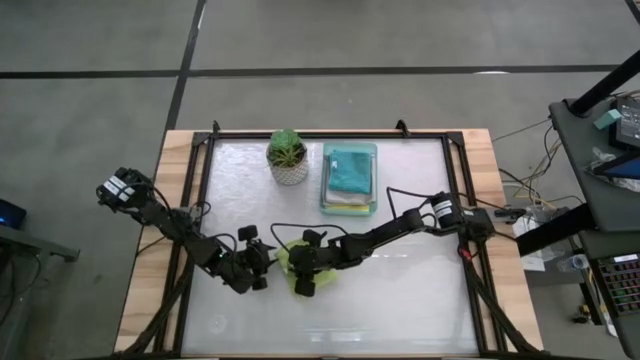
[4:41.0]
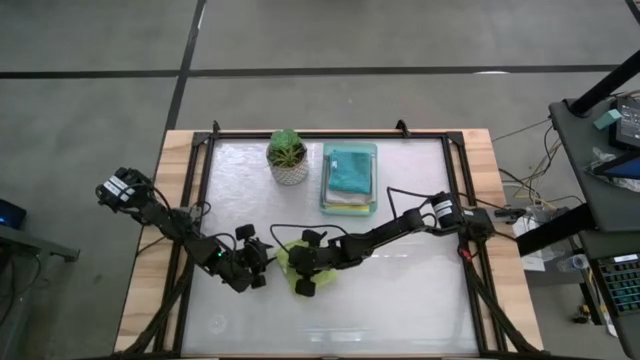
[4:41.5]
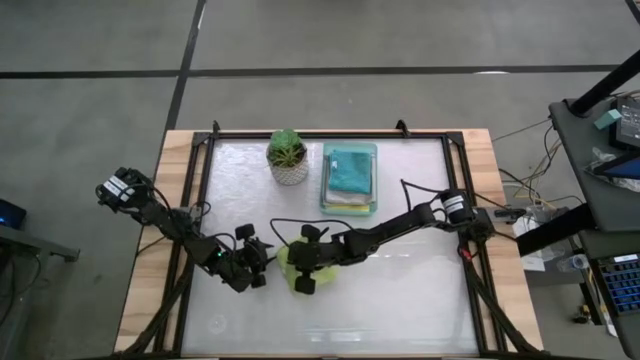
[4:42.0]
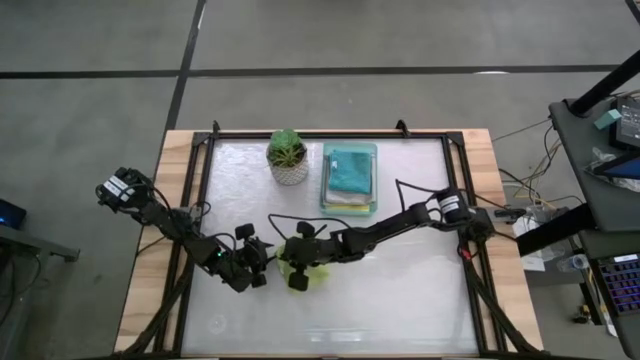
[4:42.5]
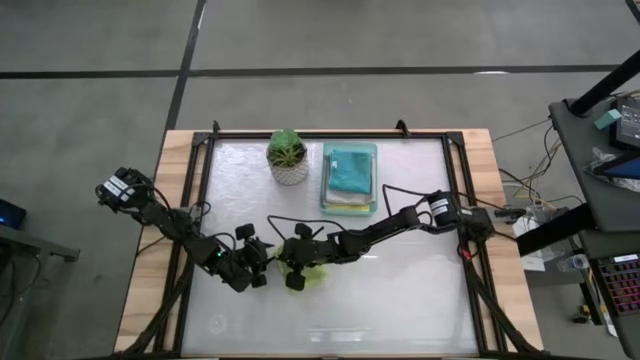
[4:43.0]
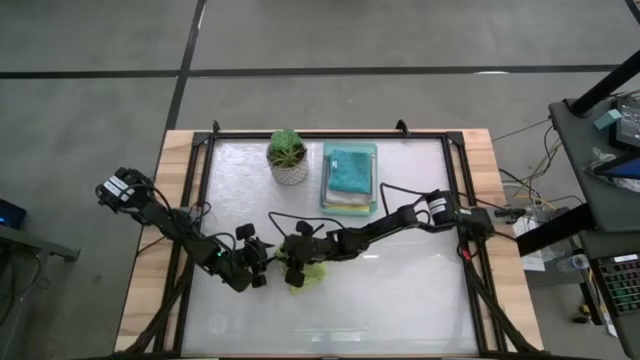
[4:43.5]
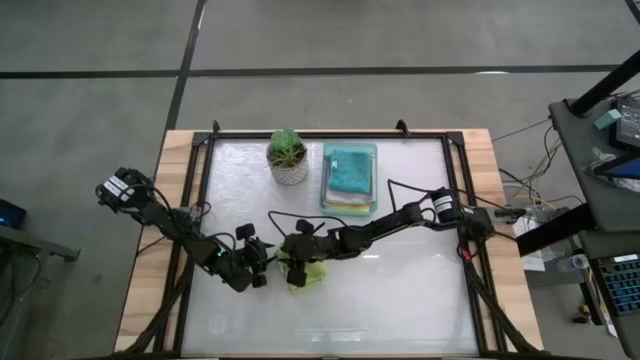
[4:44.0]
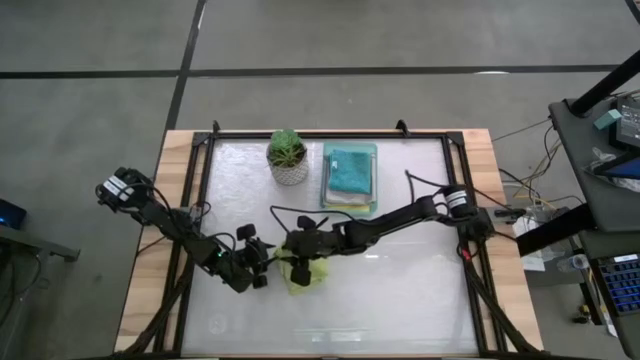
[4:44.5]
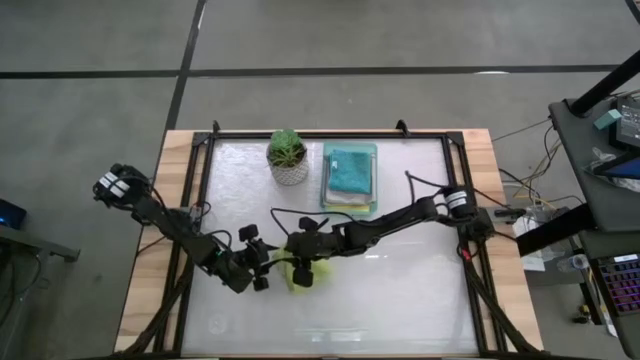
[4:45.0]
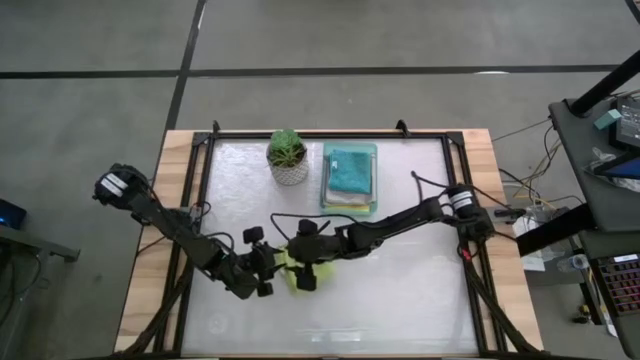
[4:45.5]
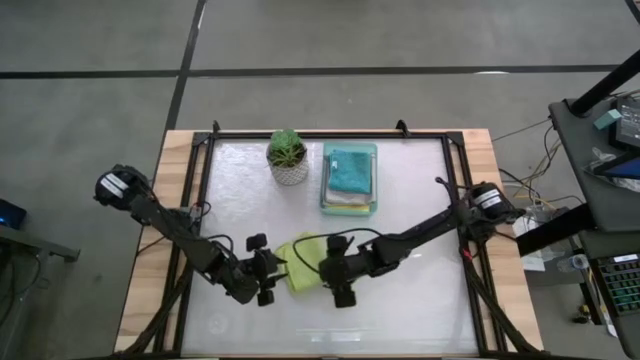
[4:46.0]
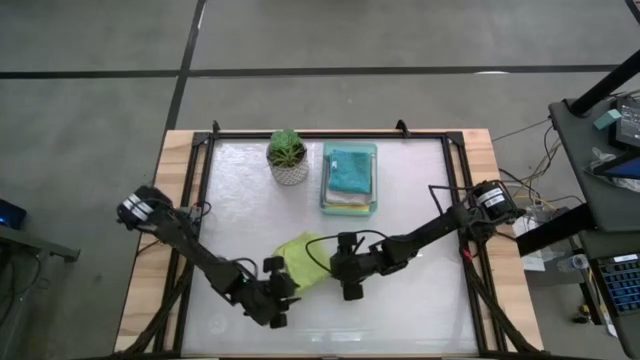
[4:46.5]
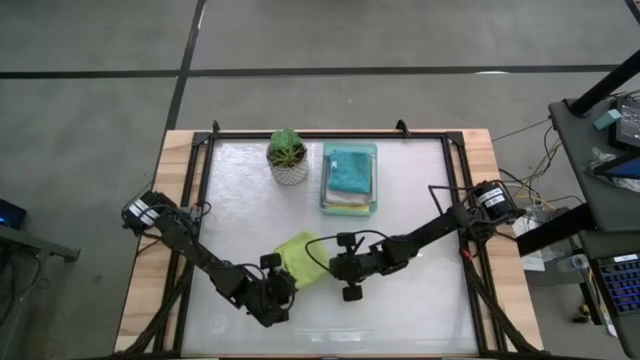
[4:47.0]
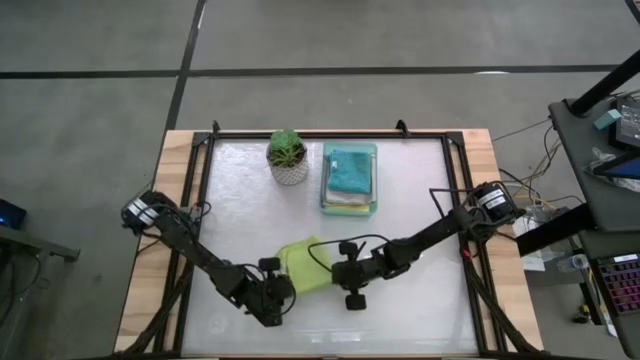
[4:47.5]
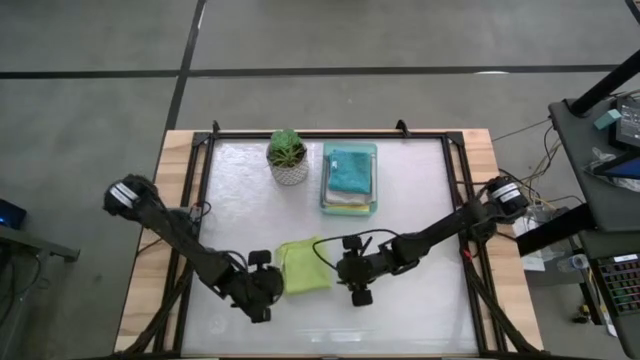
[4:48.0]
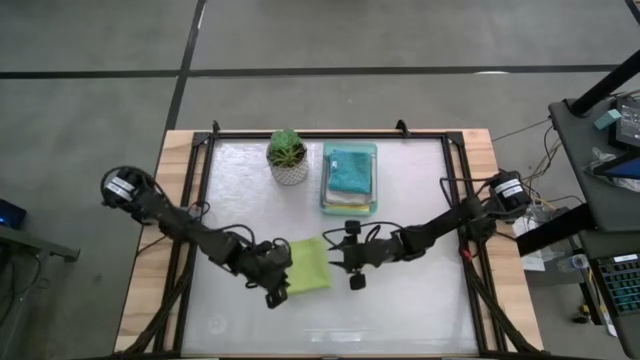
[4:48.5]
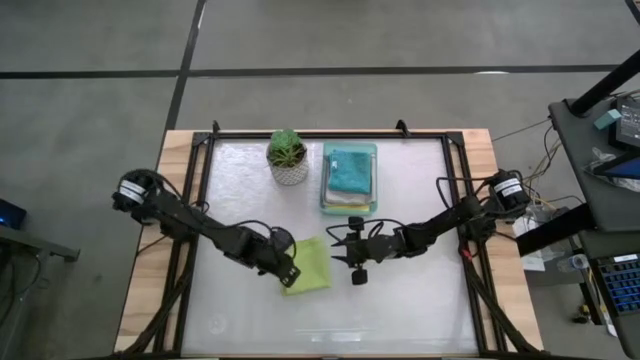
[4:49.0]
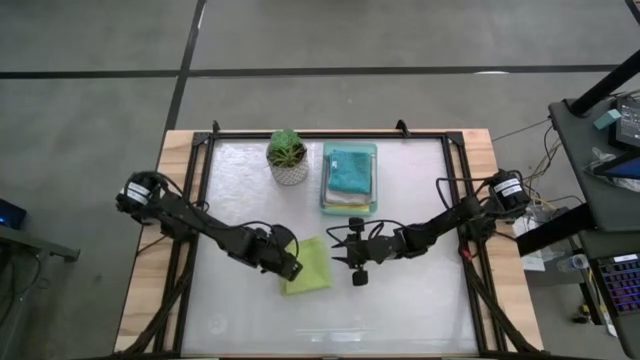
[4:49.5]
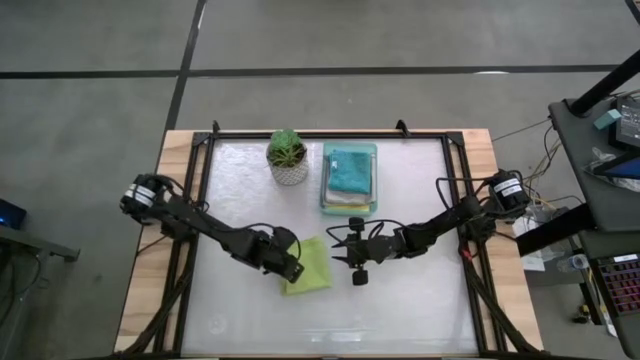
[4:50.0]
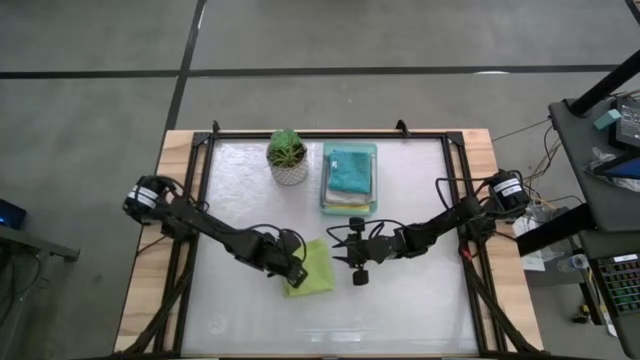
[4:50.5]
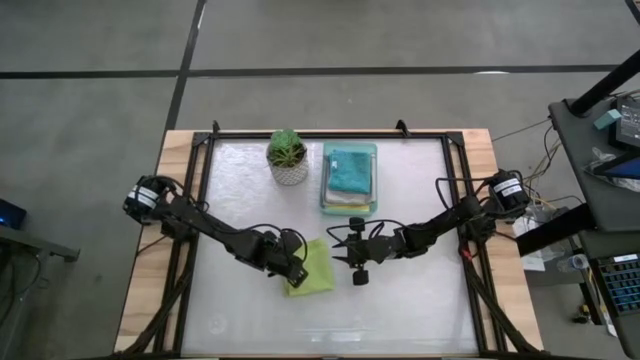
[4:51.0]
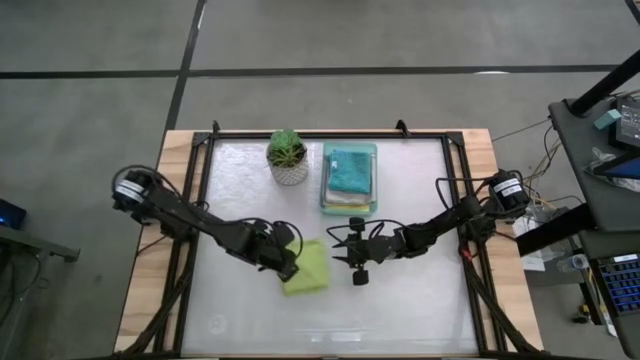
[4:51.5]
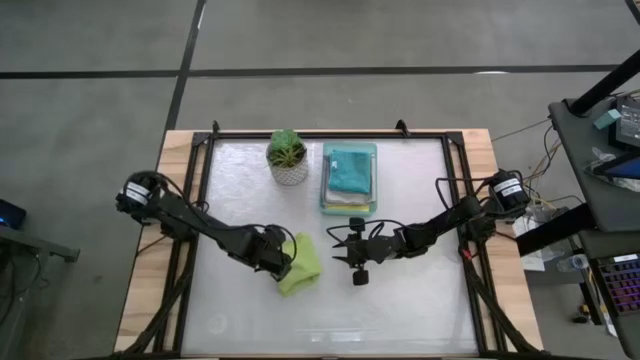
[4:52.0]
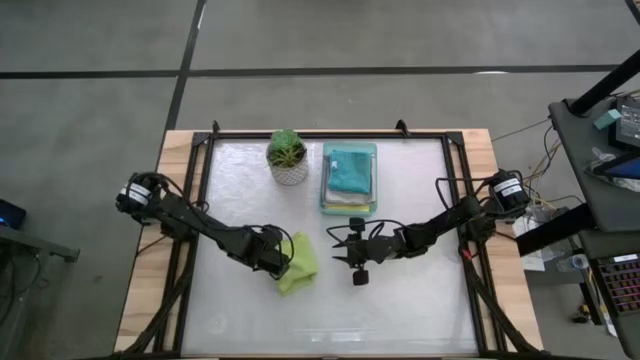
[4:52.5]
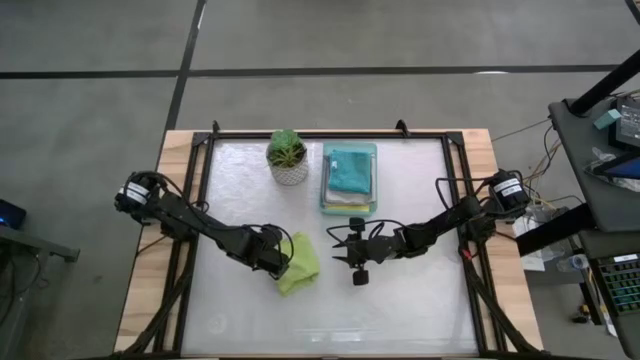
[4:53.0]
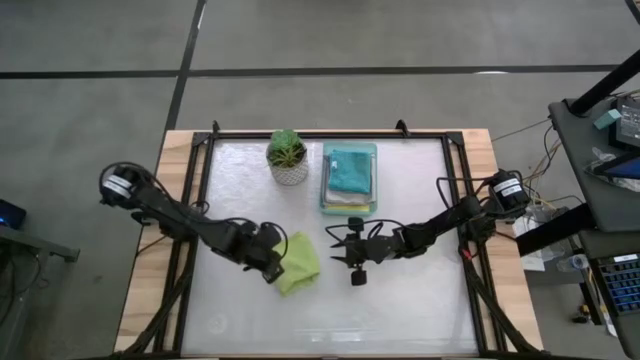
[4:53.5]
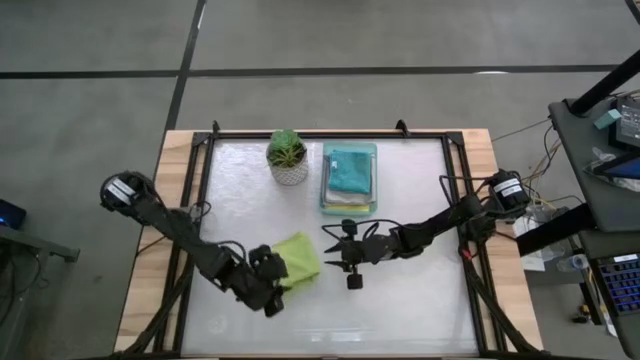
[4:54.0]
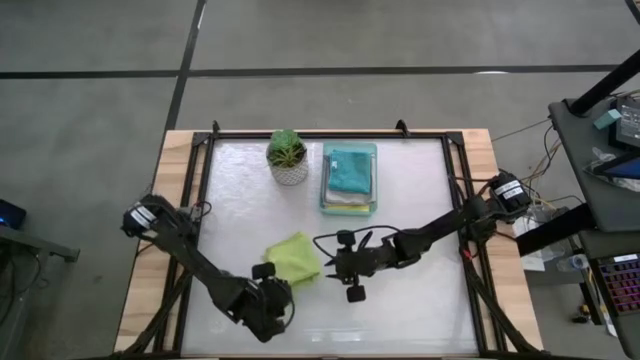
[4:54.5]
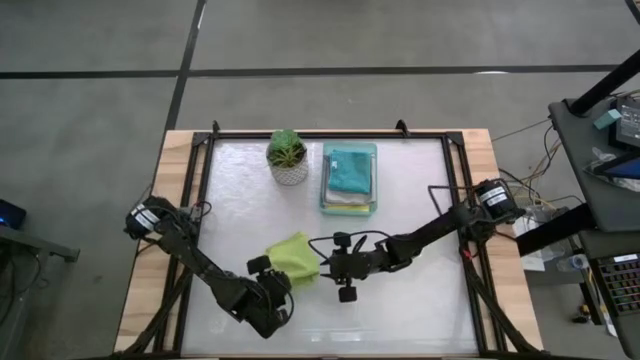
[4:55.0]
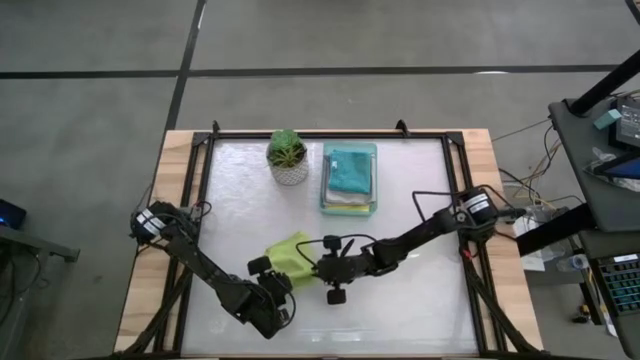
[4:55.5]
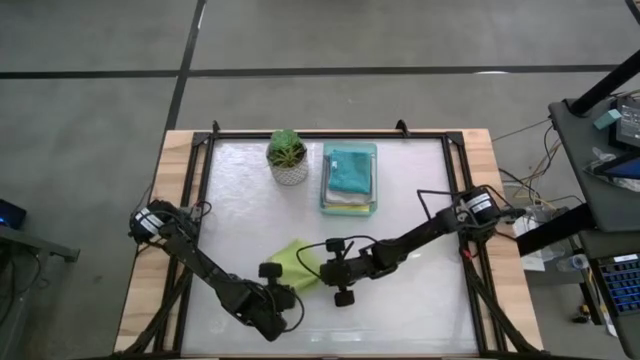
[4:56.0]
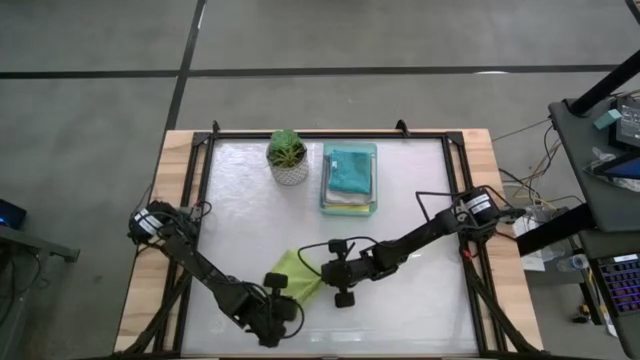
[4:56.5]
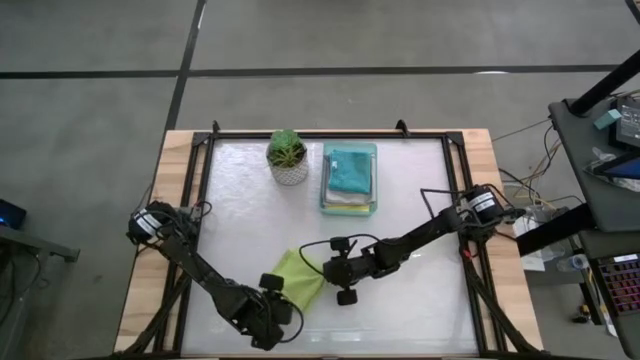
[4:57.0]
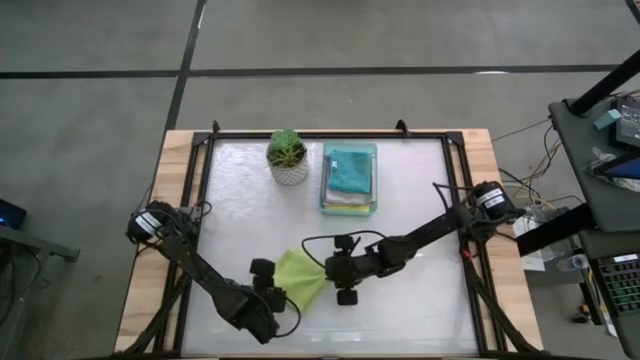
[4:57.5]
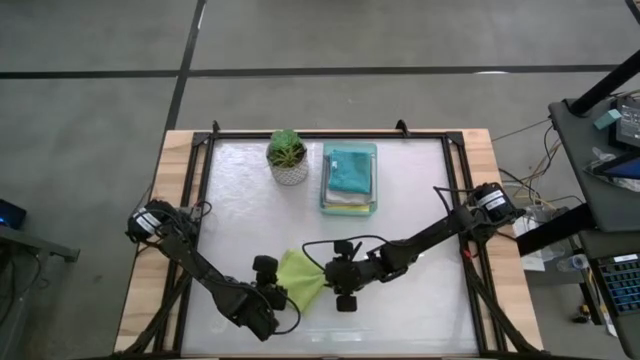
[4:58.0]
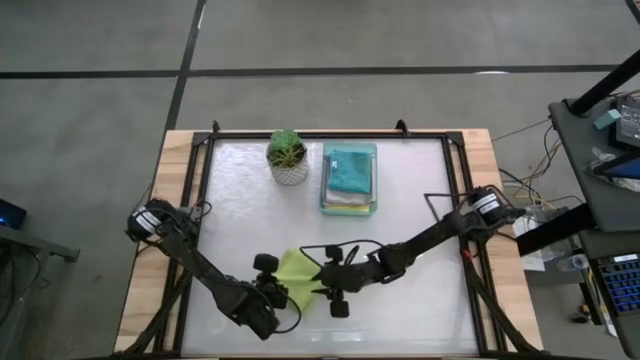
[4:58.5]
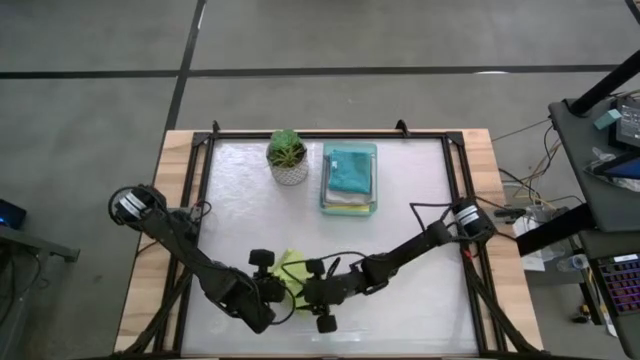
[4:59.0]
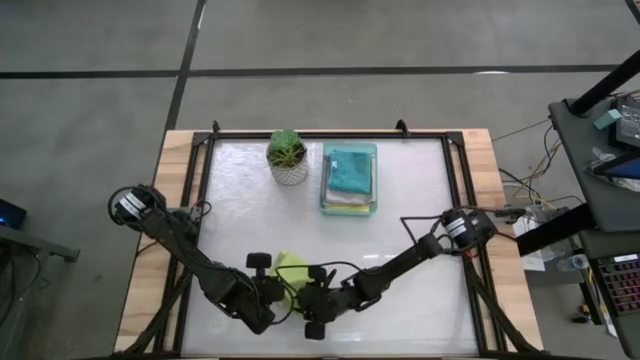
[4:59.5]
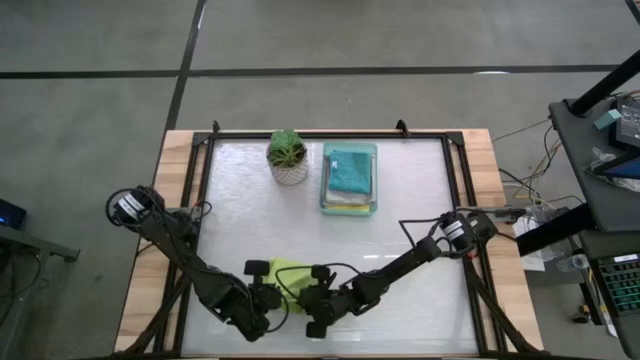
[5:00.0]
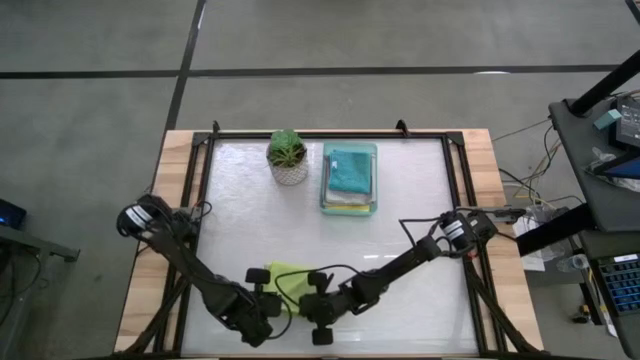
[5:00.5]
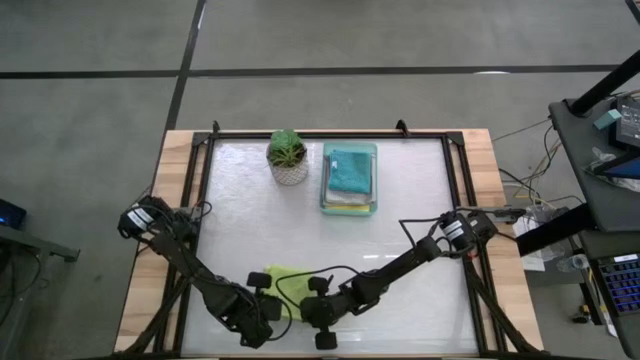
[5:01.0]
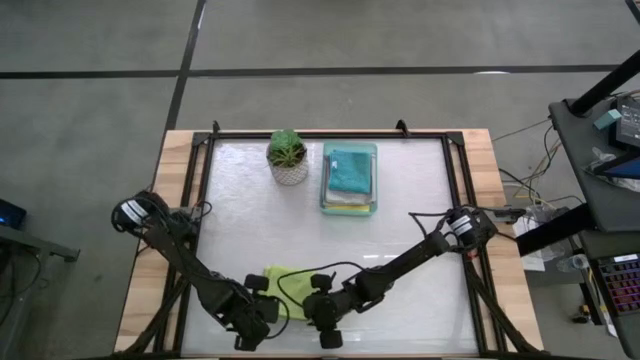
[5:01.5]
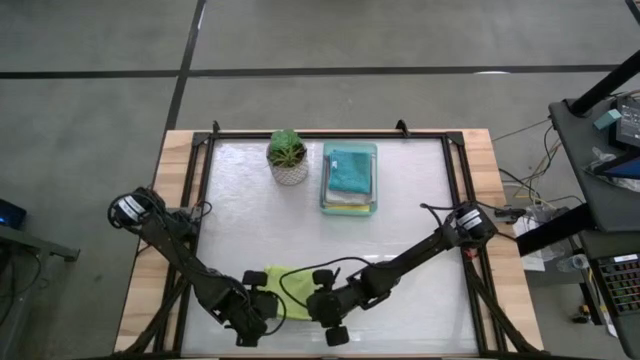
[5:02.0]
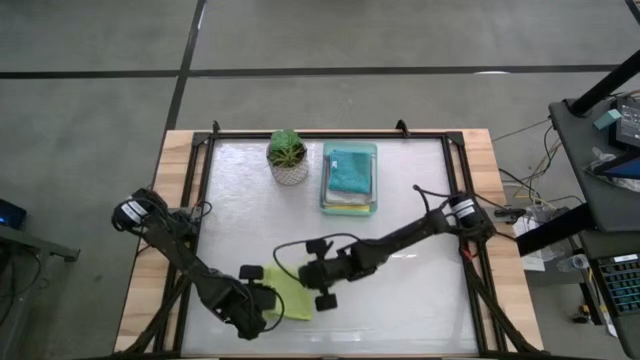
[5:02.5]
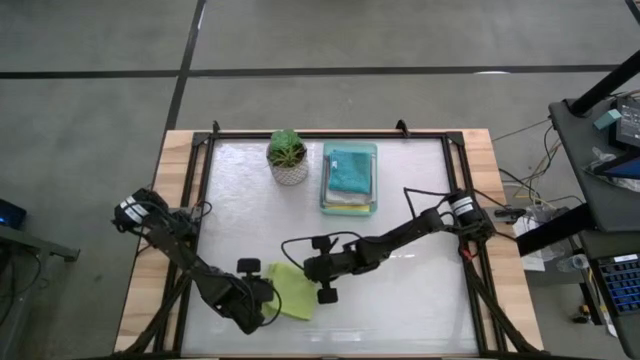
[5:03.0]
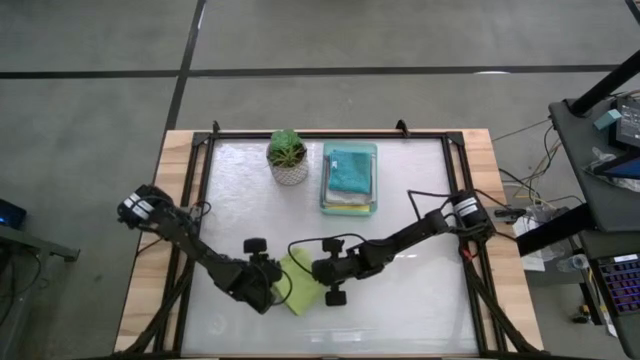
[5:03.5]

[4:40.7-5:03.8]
Task: Fold microfiber towels
Fold the green microfiber cloth
